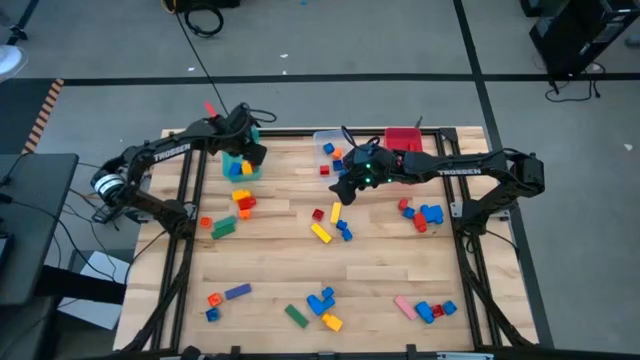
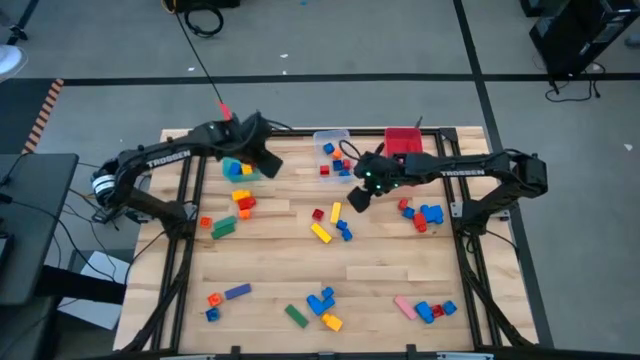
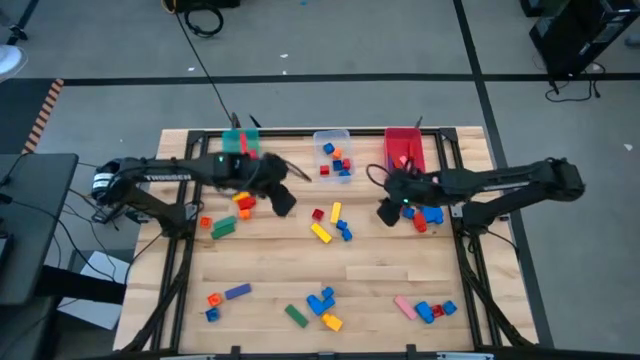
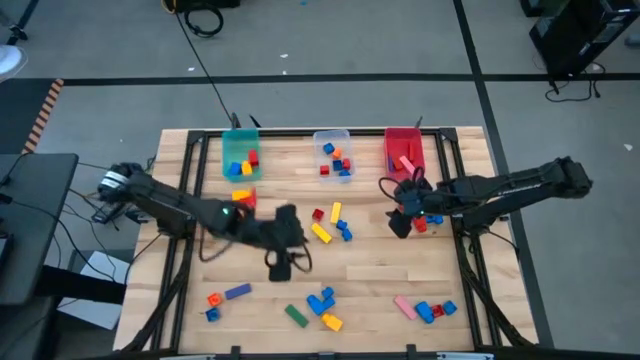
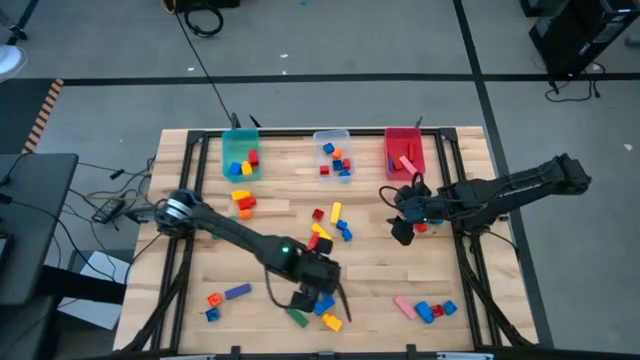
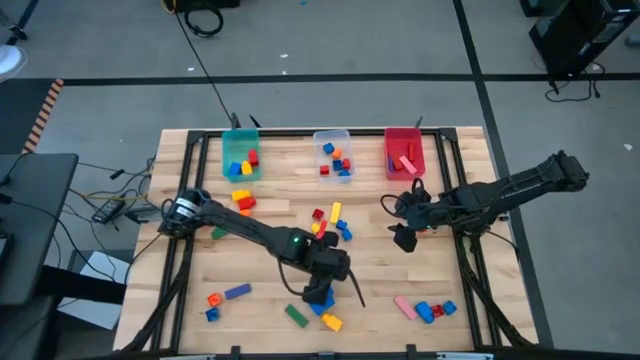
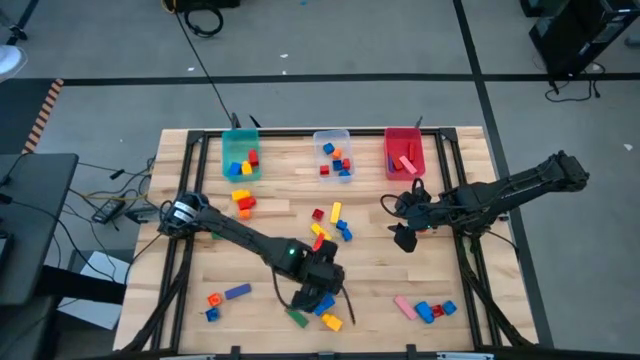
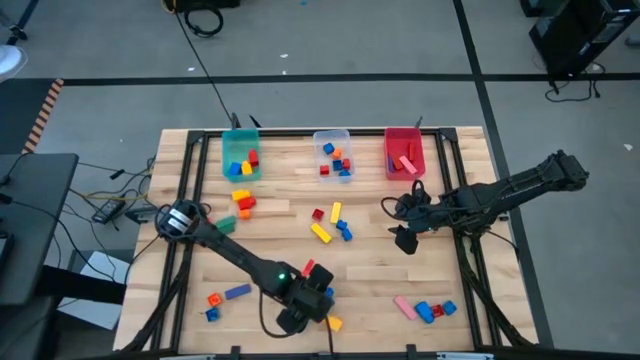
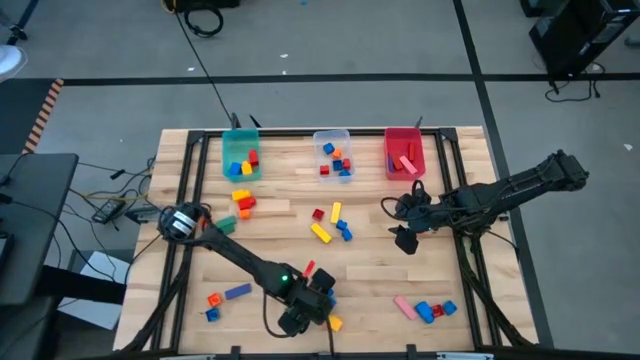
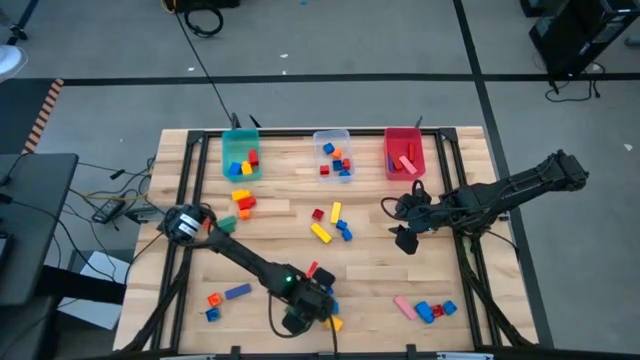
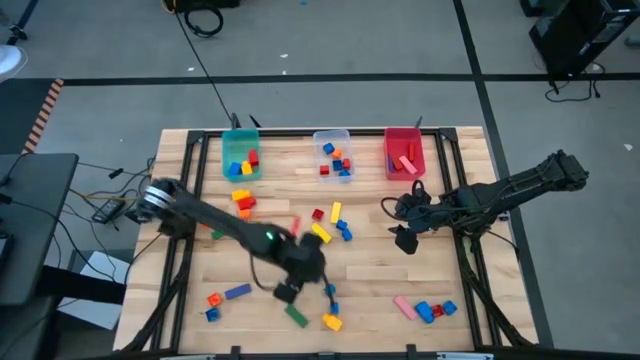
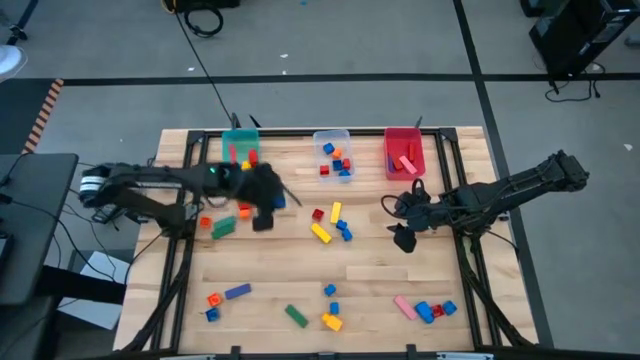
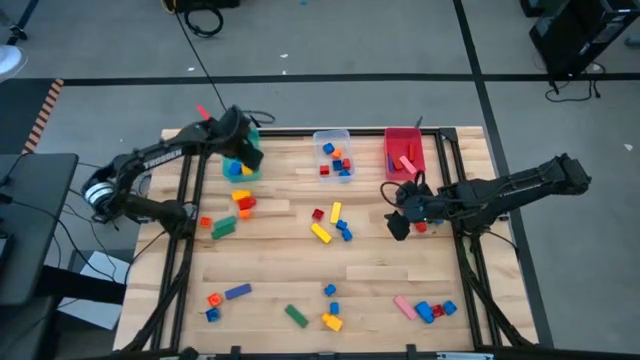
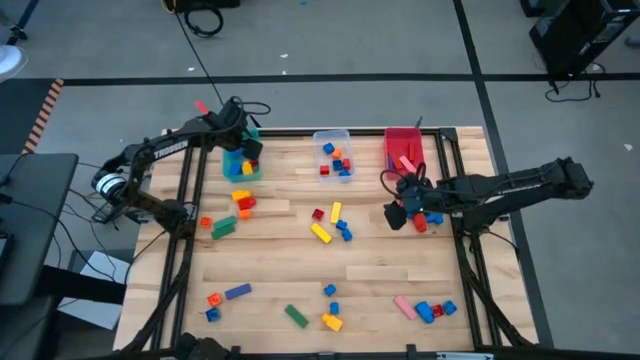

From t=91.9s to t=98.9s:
Task: Sort blocks by size
Put the blue 1 stud game piece into the blue bin

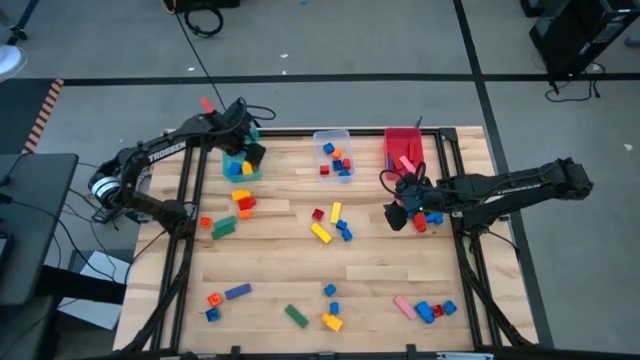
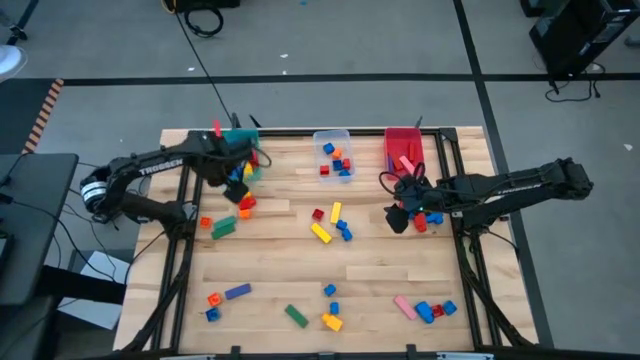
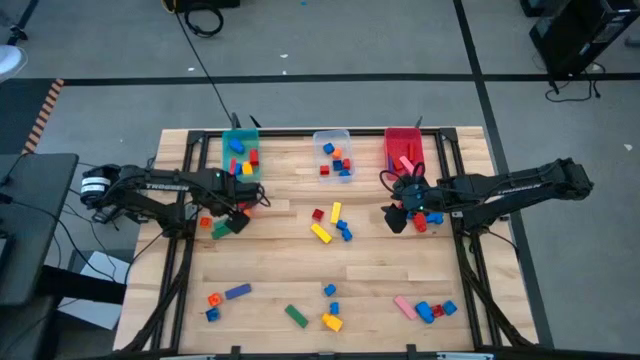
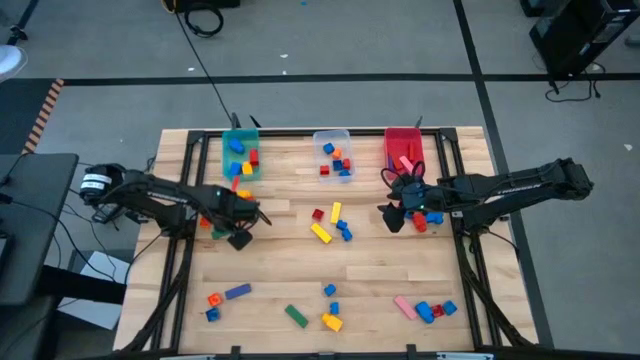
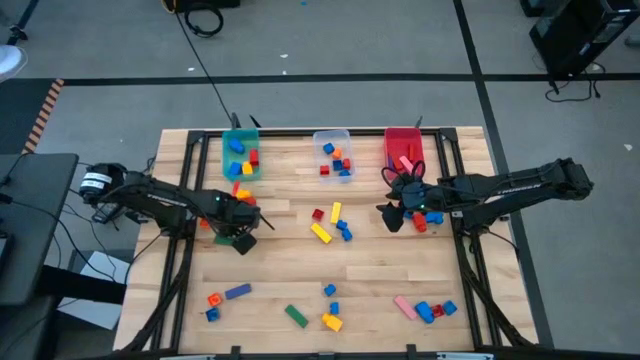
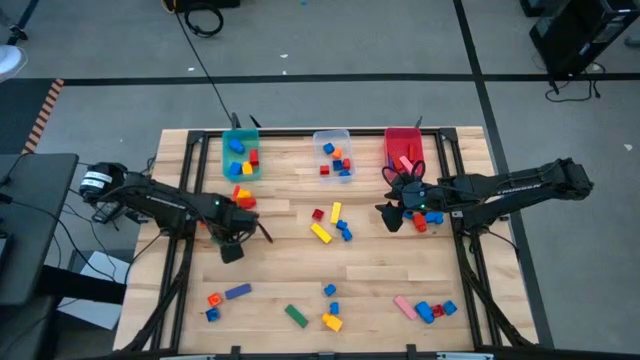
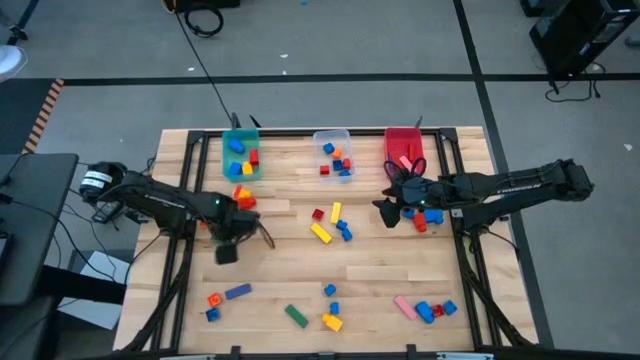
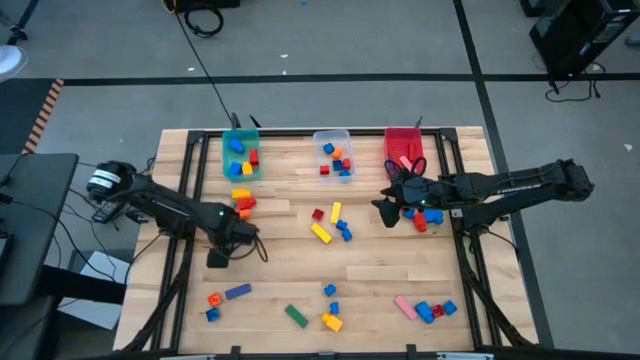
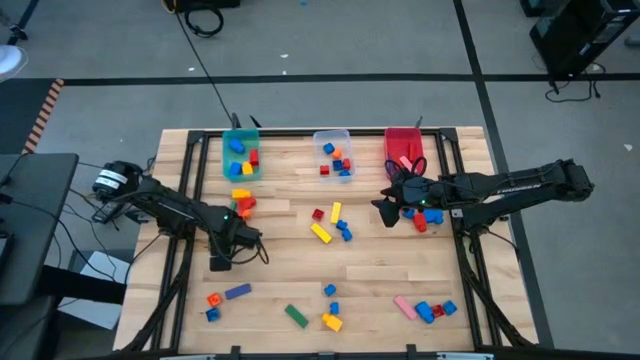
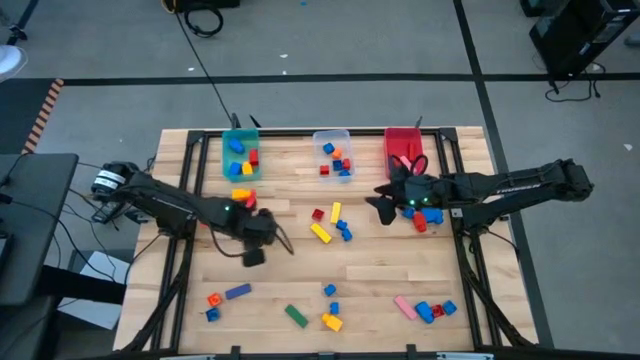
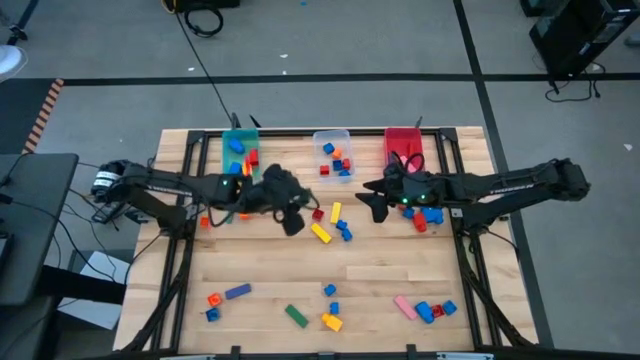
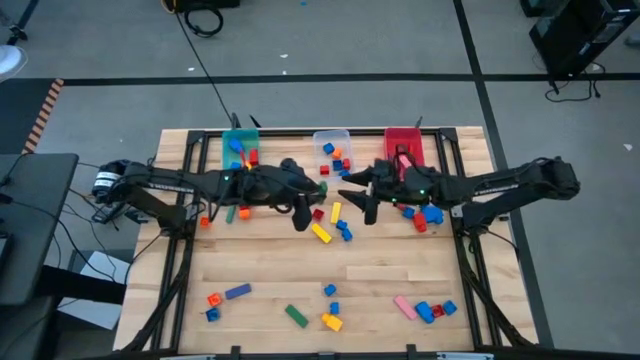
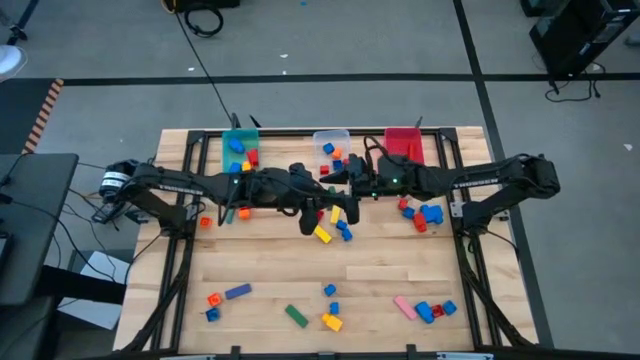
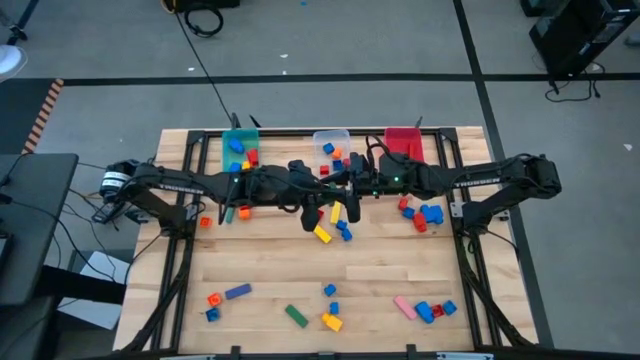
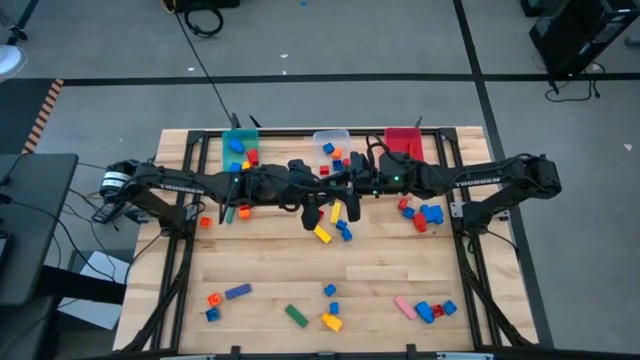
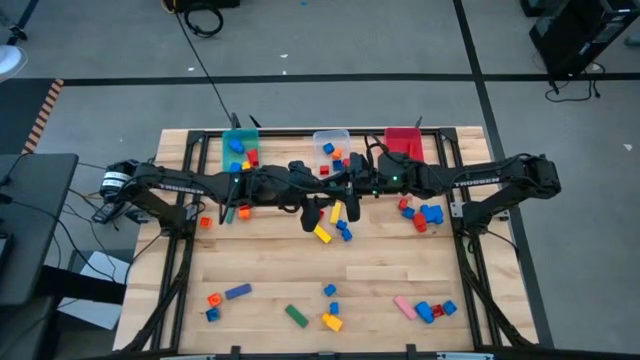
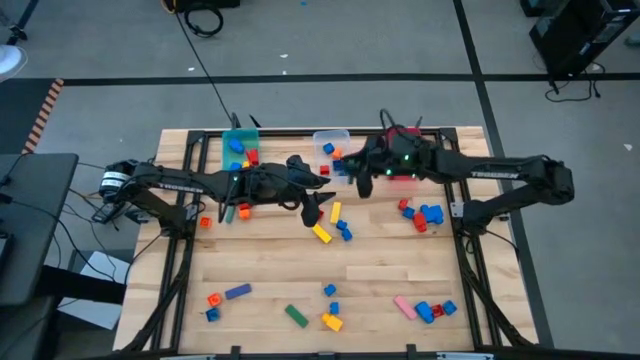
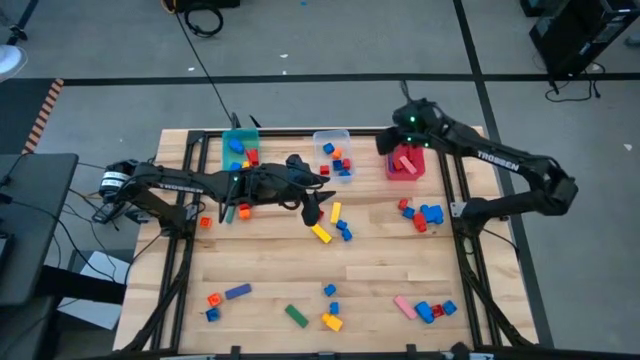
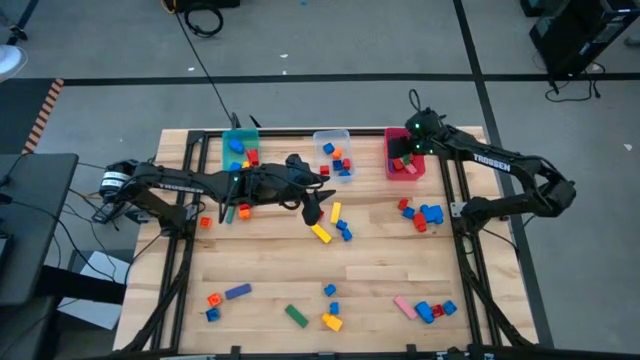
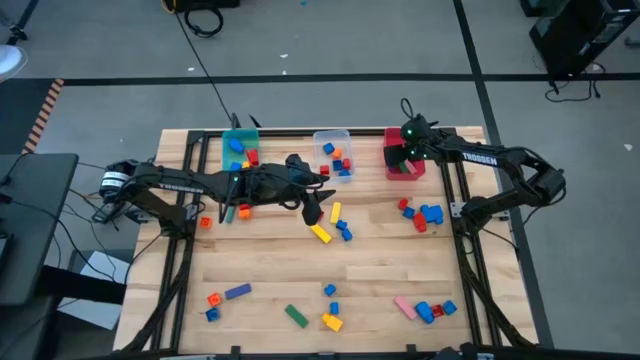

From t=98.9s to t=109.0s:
Put the green block into the red bin

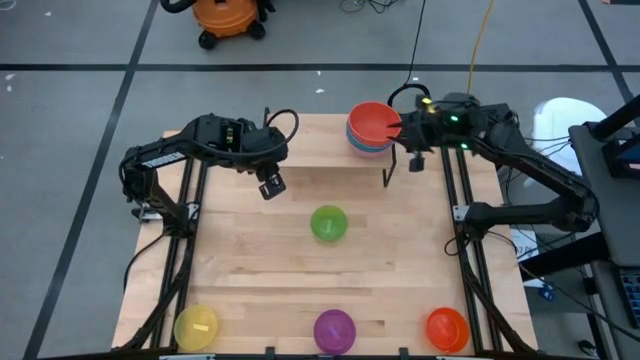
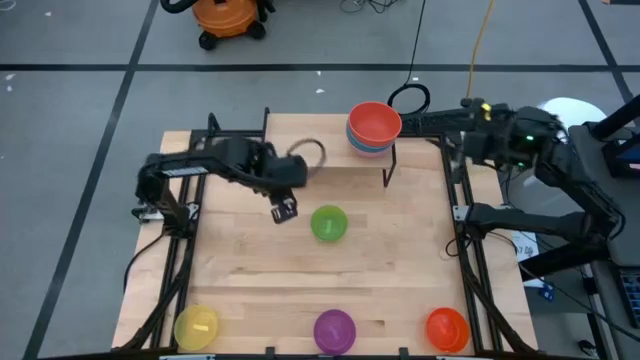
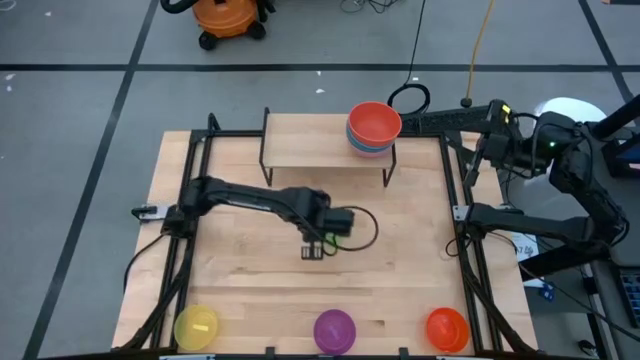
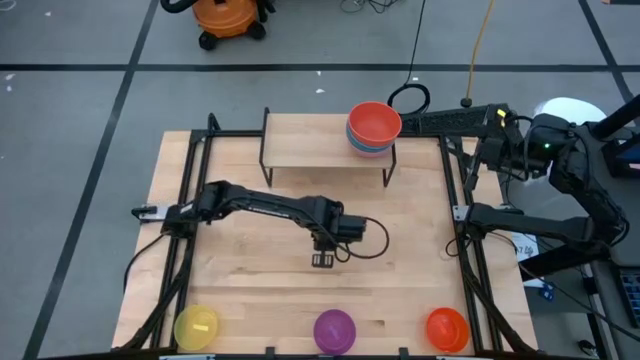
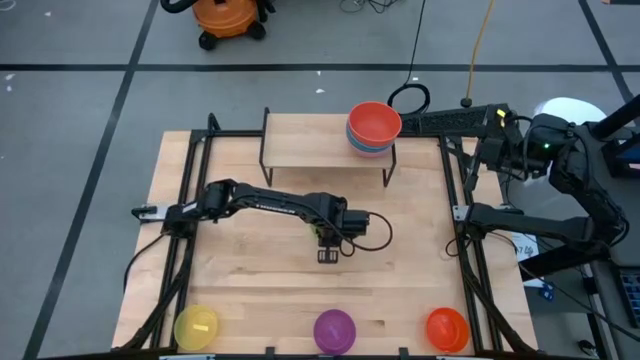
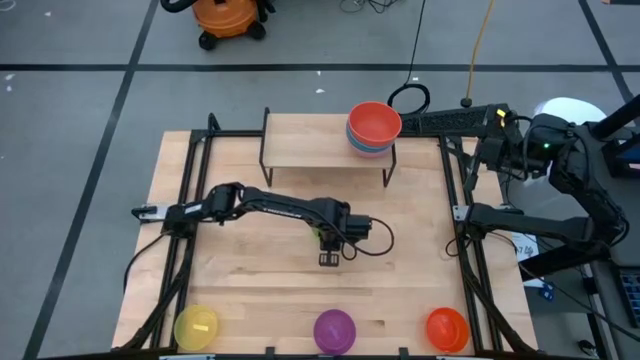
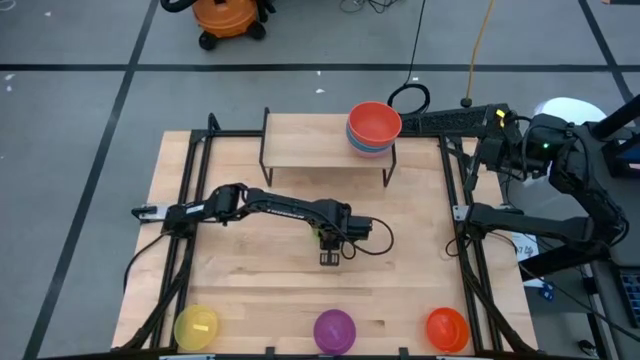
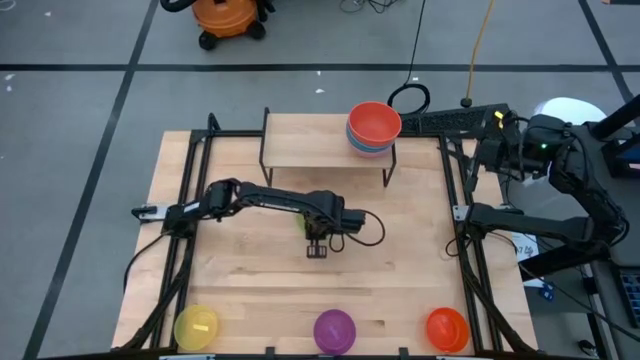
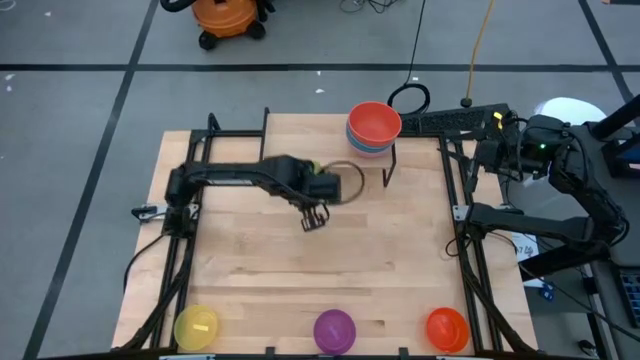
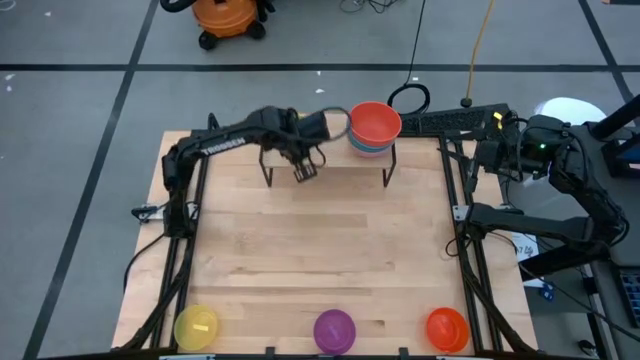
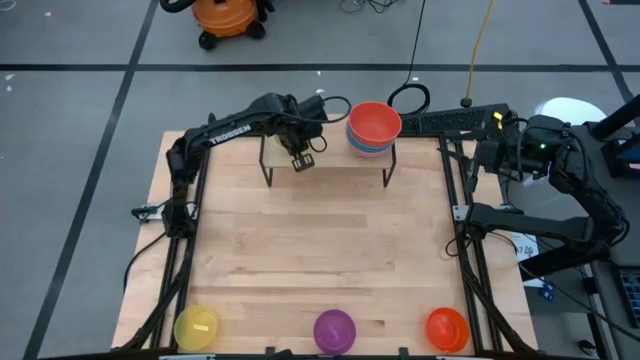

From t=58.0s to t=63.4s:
Task: Place and stack bowls onto a shelf
Put the light green bowl on the shelf
